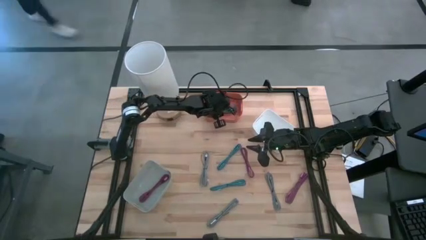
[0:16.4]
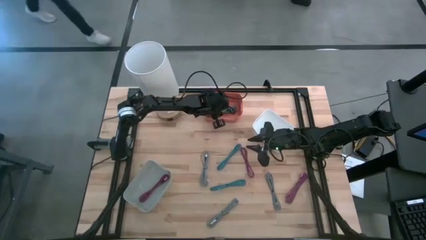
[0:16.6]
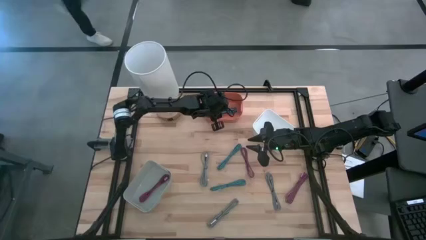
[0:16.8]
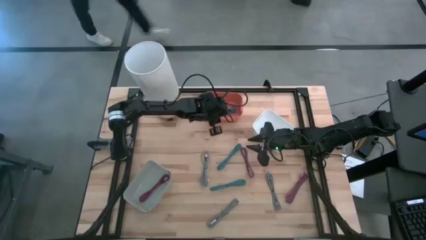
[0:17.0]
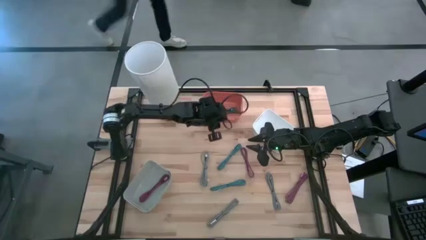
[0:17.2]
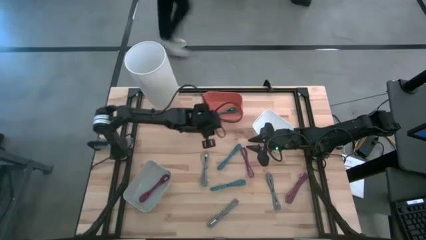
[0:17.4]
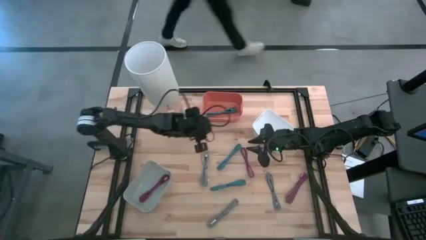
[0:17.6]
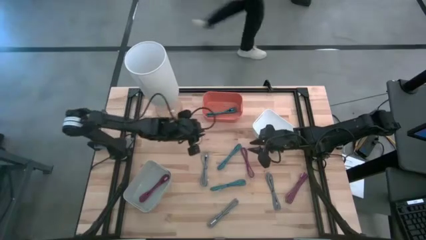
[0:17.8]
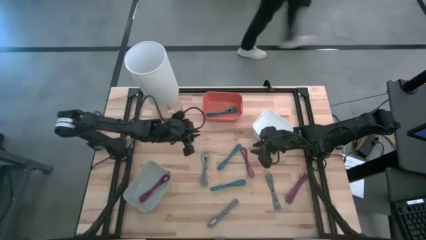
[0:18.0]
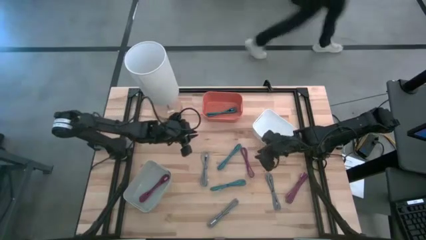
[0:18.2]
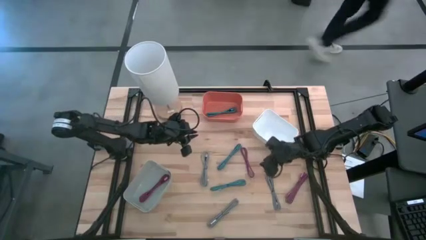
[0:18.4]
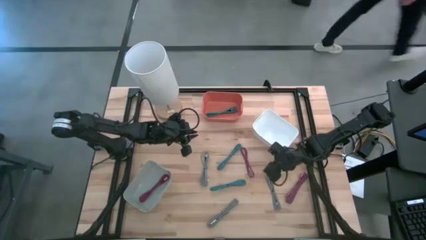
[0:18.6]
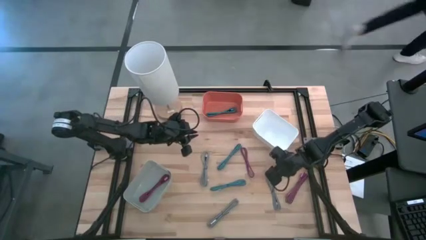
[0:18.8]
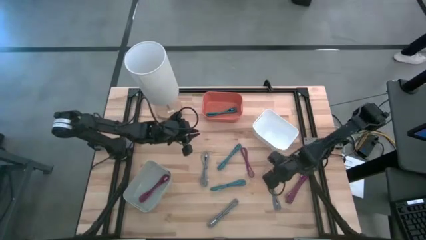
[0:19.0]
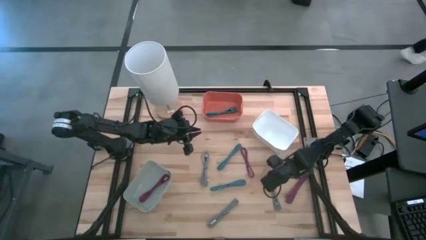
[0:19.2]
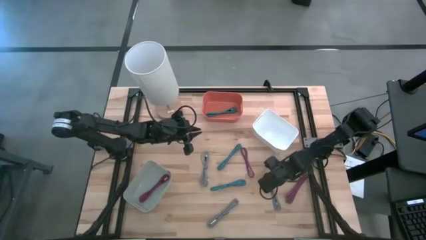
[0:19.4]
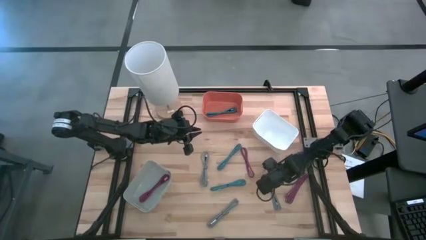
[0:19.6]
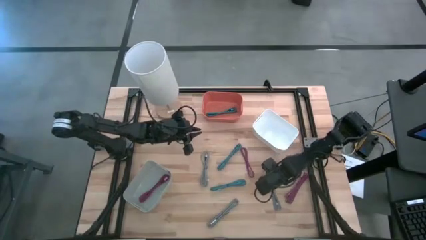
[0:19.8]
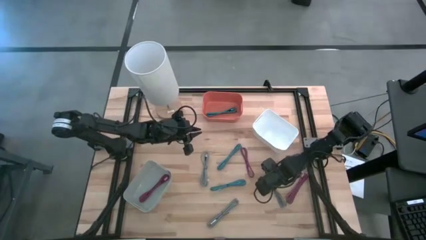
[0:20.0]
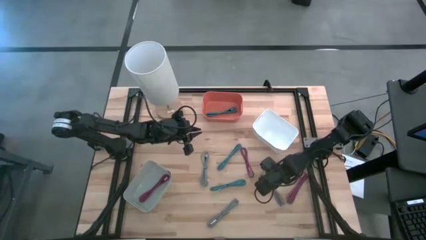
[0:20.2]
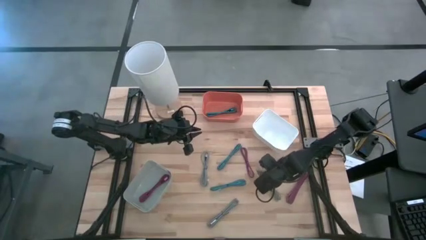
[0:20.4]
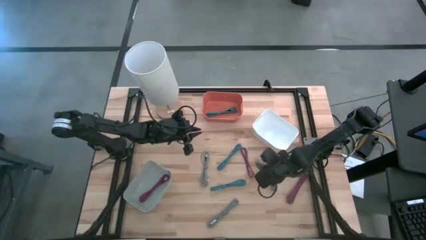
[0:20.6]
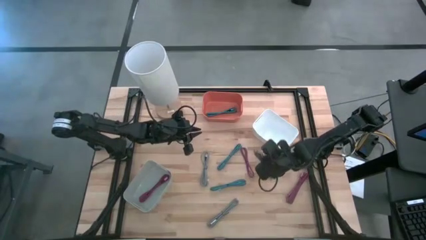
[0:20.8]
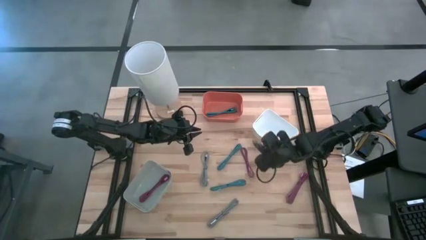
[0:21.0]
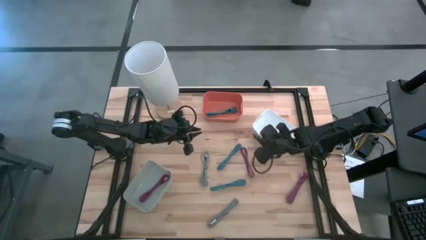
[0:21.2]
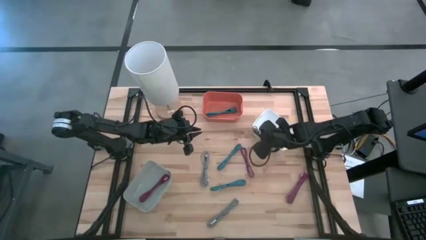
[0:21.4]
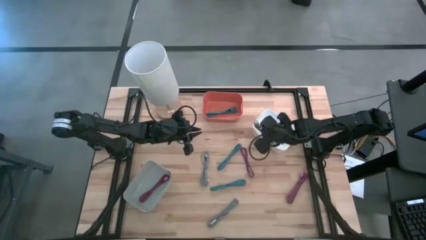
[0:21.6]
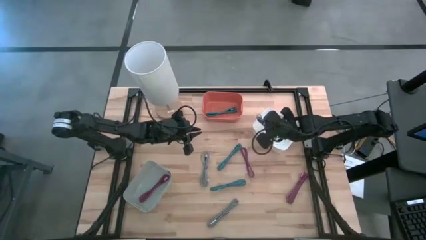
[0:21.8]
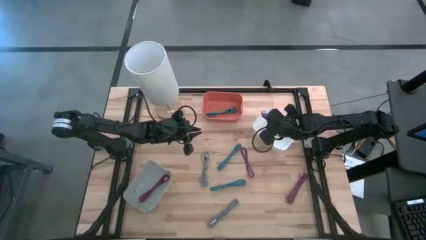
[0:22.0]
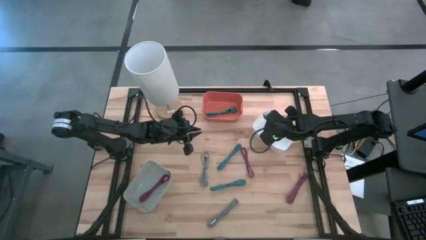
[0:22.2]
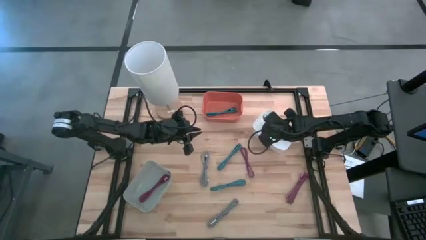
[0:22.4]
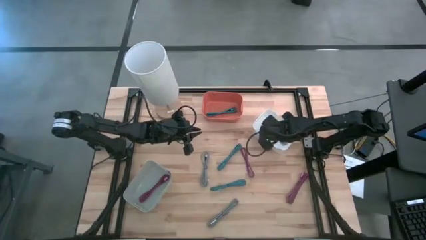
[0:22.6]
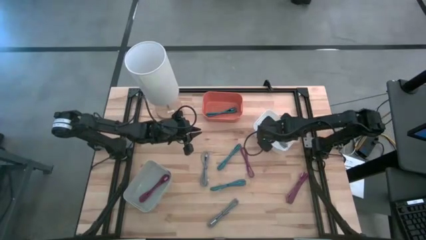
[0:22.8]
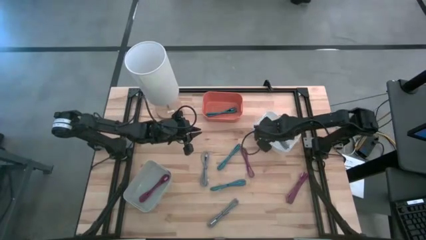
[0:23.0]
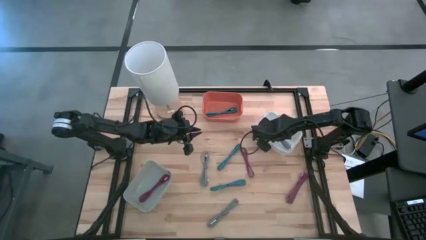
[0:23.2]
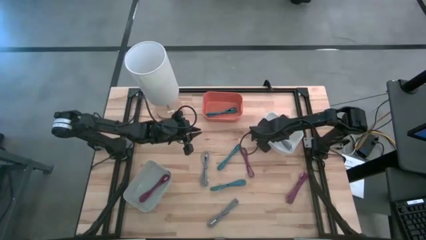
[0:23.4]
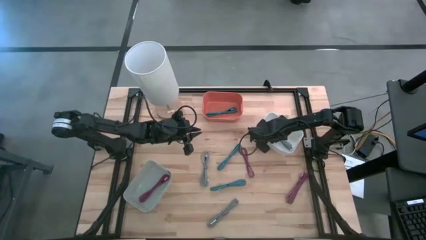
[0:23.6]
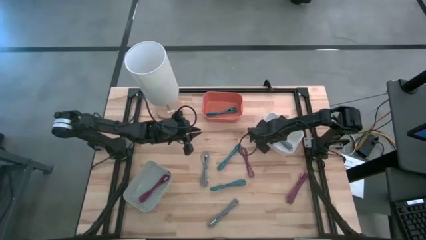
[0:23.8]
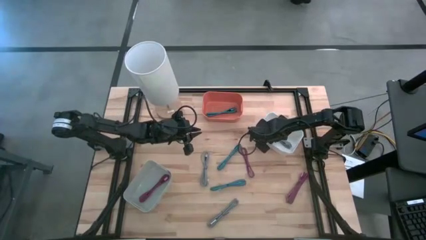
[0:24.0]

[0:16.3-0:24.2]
Task: Pick & Place USB Port
Put the middle right white and black charger cable into the white bin

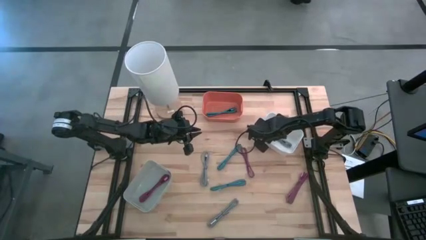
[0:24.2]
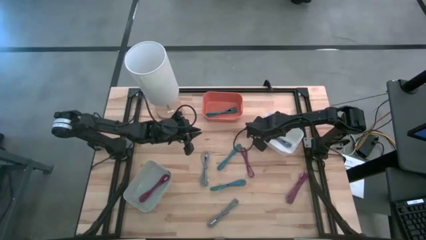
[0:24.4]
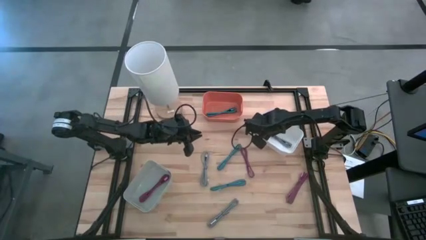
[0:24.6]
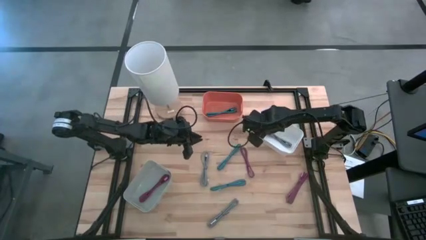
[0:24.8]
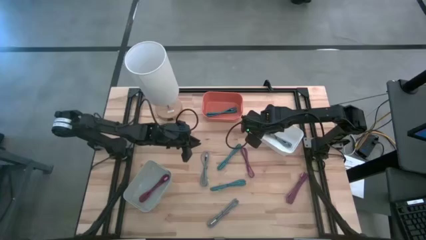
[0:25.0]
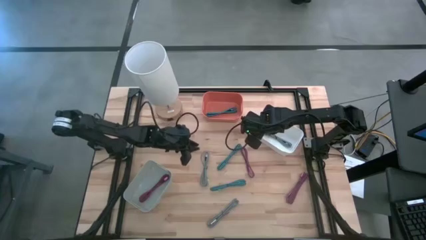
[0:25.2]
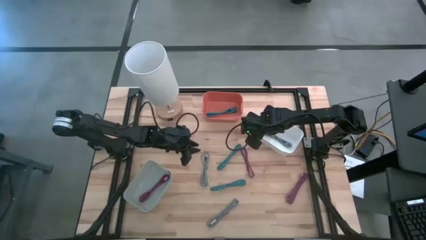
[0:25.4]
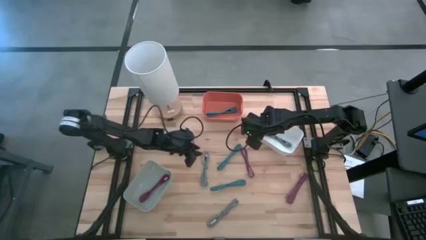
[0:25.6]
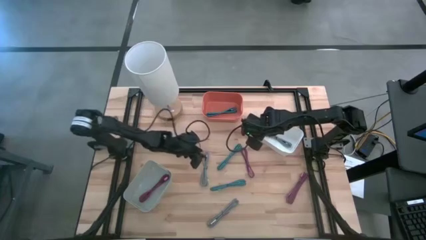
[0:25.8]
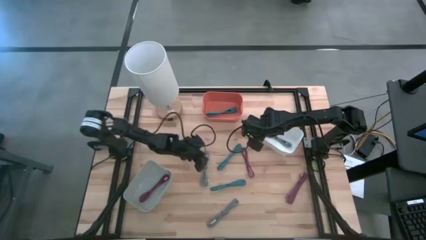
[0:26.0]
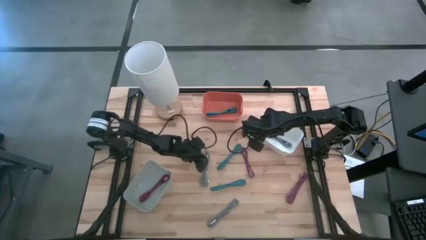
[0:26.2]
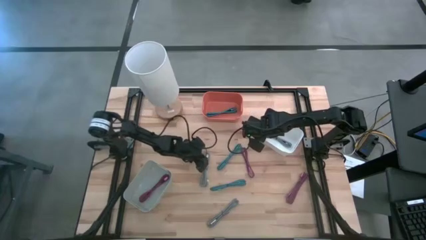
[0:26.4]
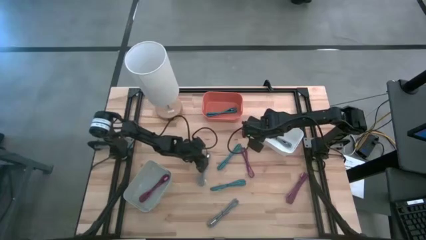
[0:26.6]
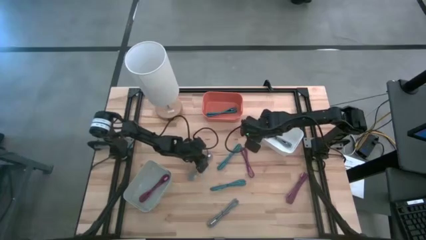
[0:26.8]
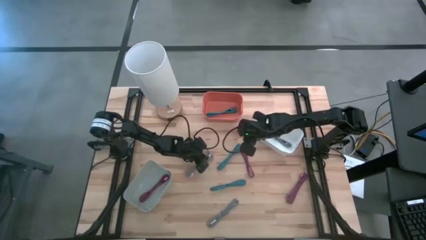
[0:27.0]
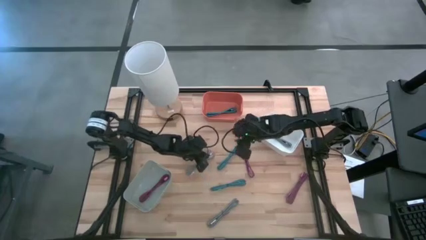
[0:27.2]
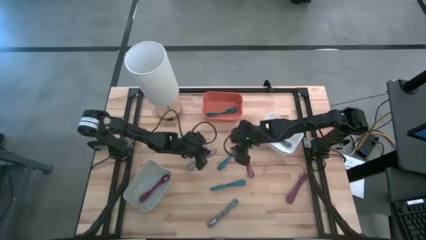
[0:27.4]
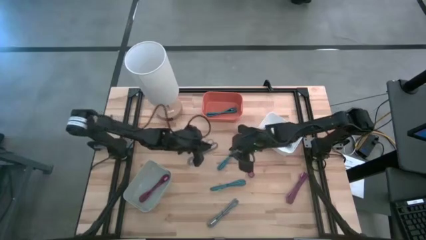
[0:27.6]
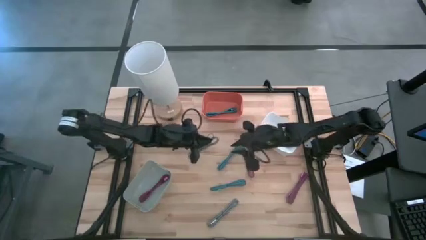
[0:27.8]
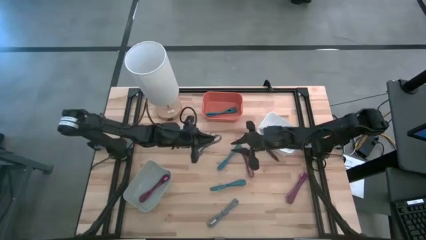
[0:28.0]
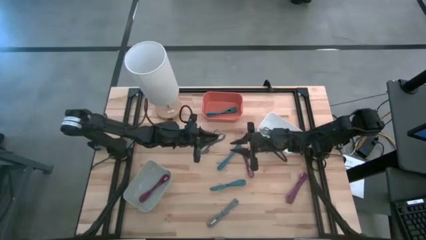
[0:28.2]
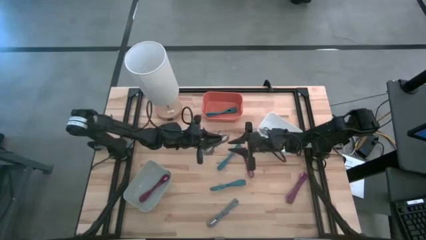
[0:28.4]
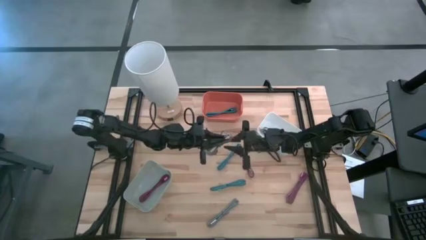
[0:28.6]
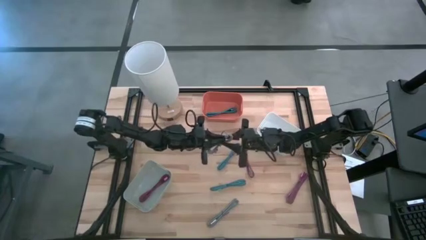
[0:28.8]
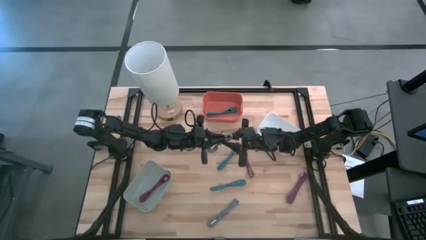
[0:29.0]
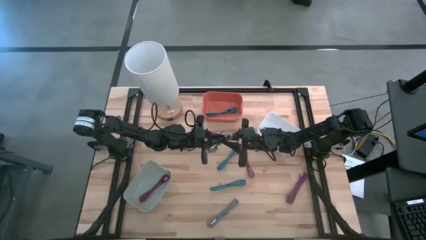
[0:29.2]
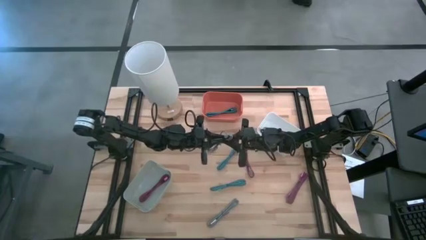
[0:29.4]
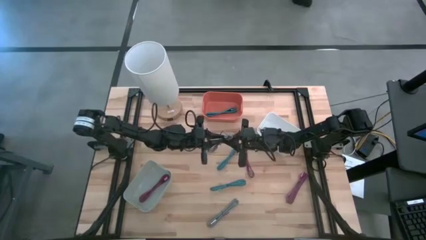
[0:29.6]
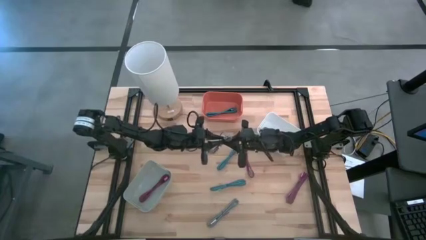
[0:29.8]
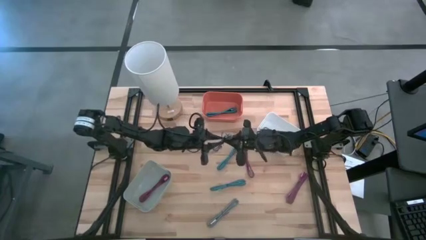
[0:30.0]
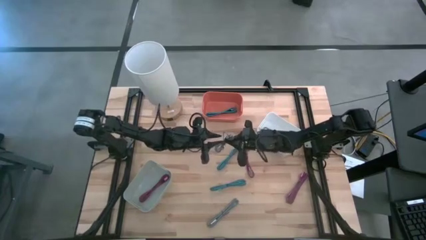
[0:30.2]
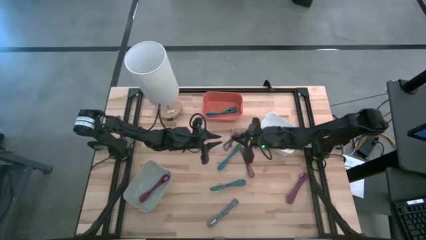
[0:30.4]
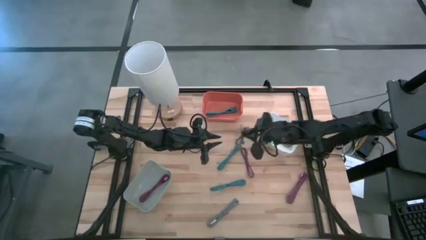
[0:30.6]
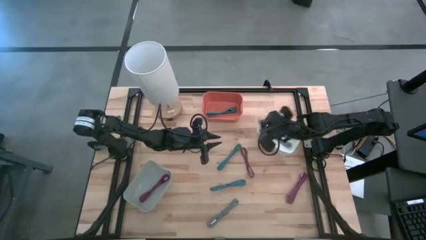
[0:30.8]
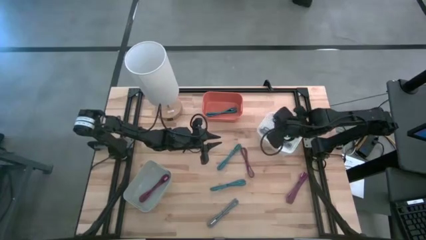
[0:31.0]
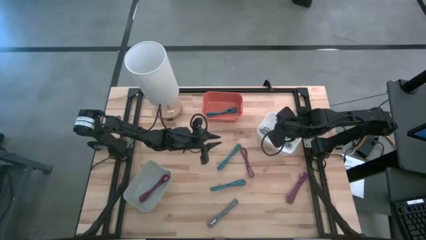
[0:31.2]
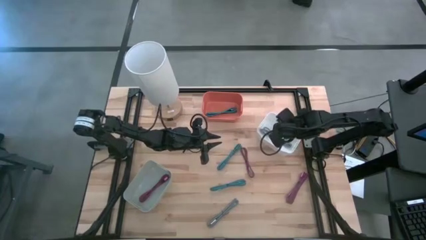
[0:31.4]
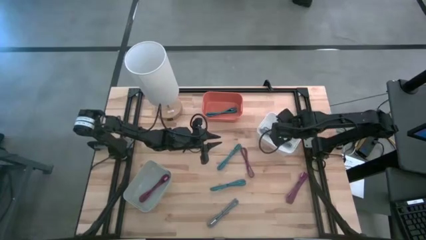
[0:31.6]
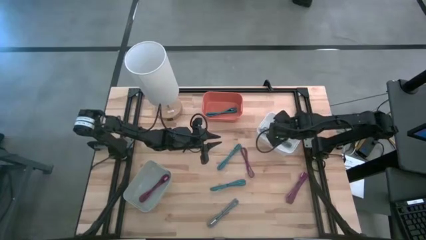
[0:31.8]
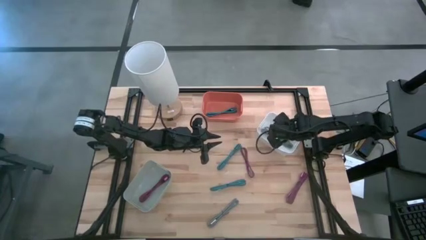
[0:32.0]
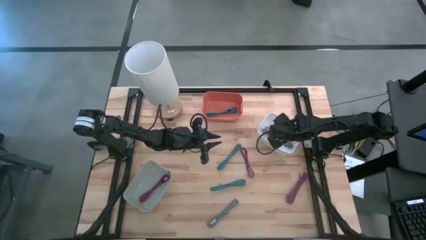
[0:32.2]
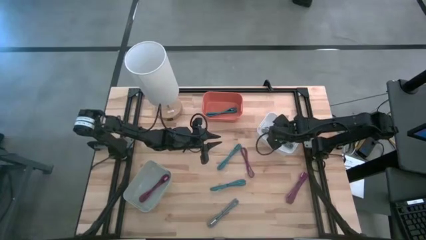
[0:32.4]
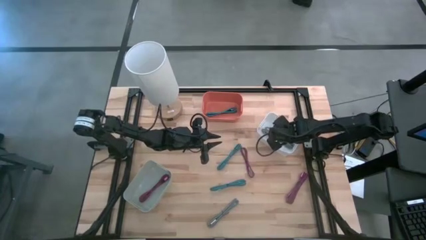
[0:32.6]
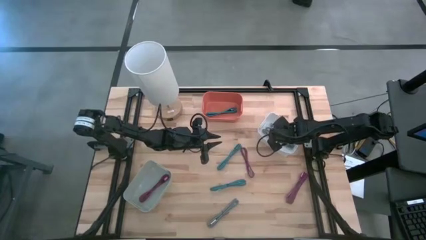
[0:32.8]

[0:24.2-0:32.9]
Put the top white and black charger cable into the white bin
